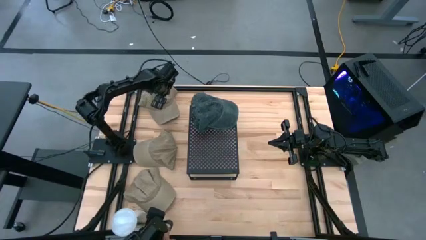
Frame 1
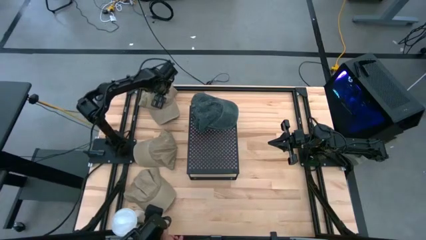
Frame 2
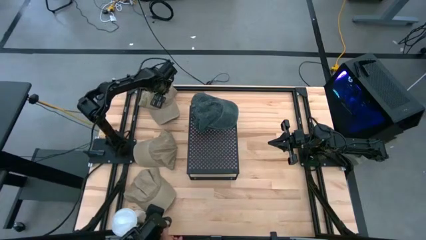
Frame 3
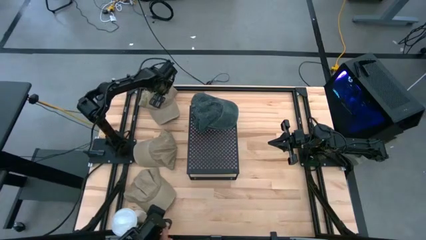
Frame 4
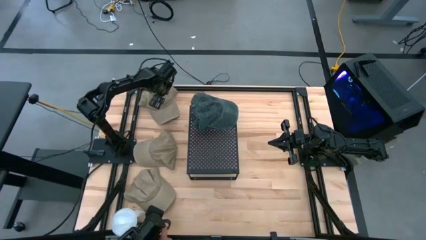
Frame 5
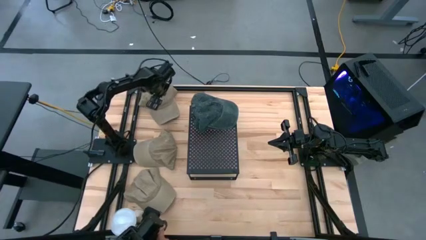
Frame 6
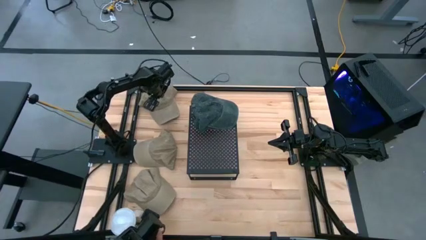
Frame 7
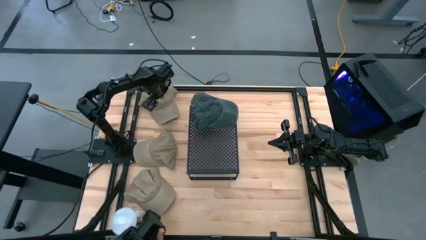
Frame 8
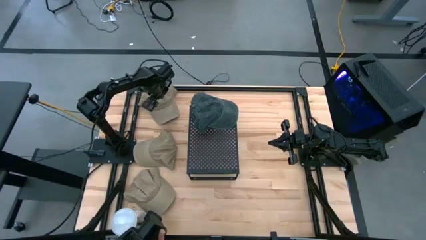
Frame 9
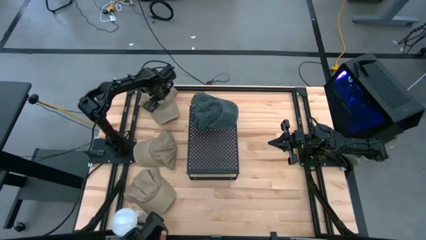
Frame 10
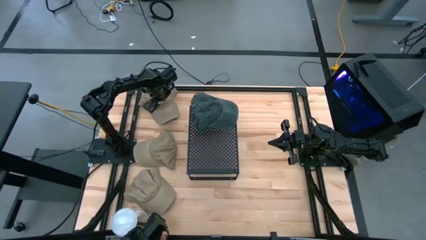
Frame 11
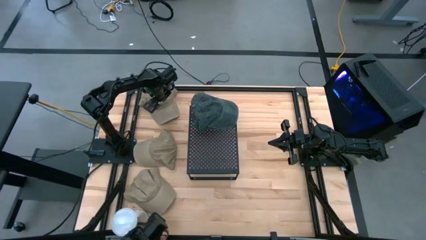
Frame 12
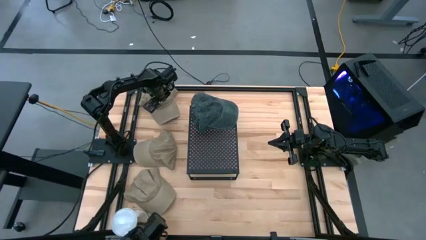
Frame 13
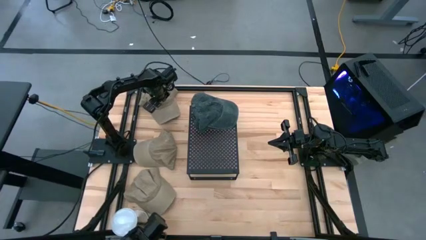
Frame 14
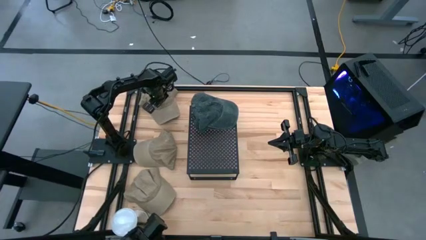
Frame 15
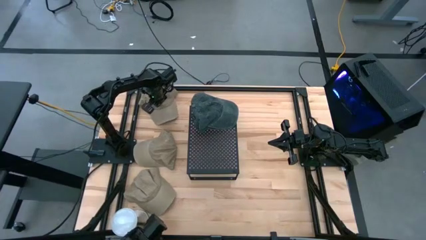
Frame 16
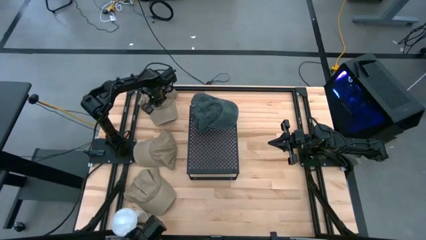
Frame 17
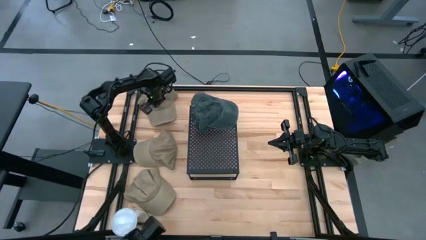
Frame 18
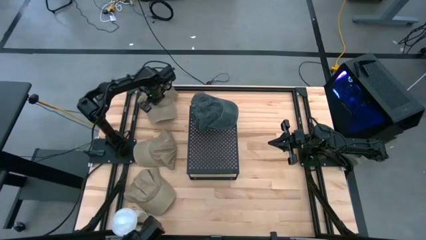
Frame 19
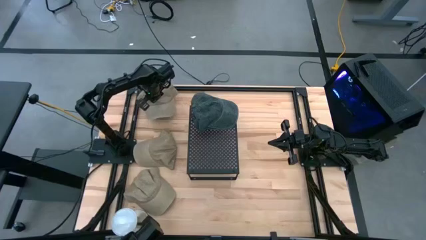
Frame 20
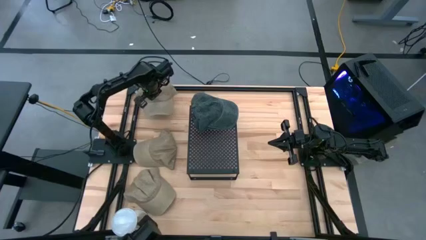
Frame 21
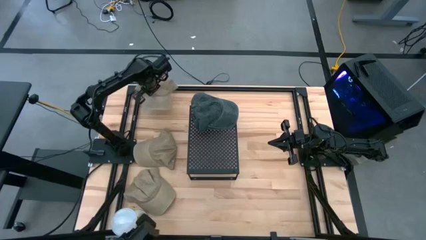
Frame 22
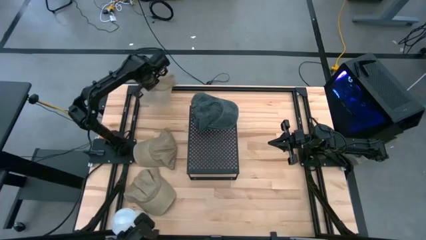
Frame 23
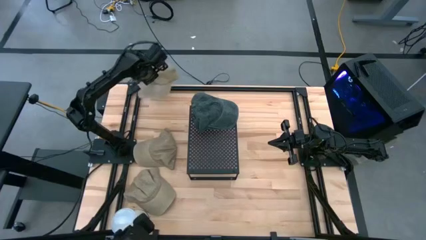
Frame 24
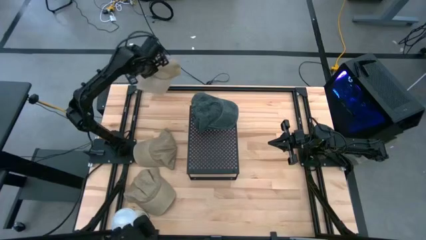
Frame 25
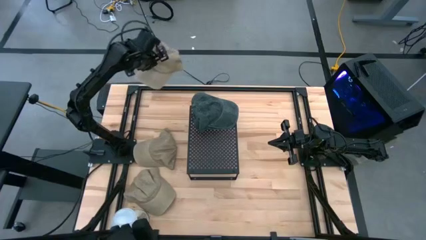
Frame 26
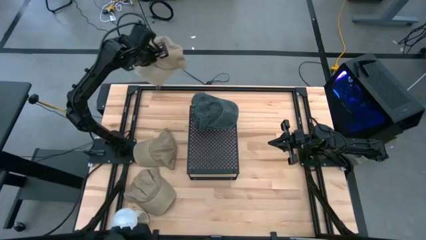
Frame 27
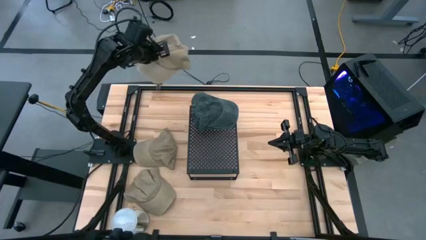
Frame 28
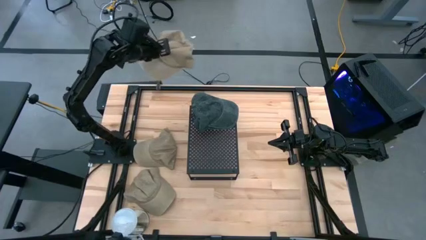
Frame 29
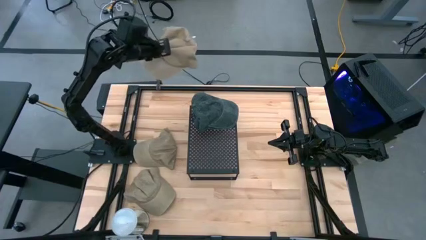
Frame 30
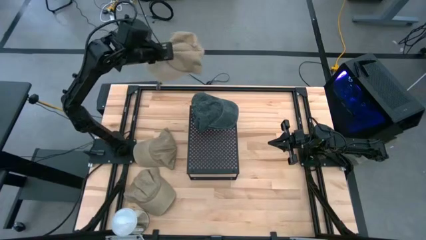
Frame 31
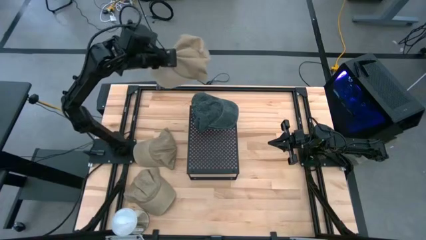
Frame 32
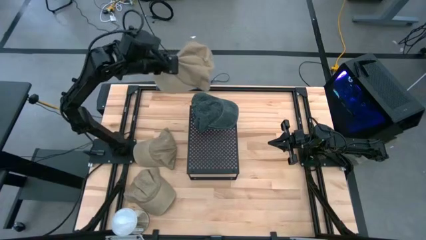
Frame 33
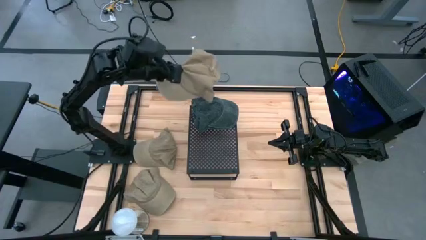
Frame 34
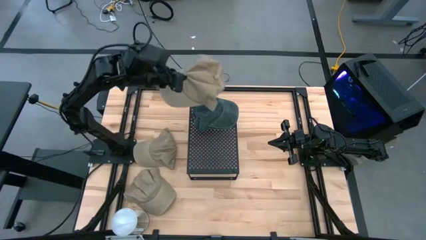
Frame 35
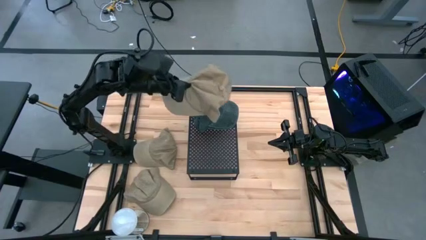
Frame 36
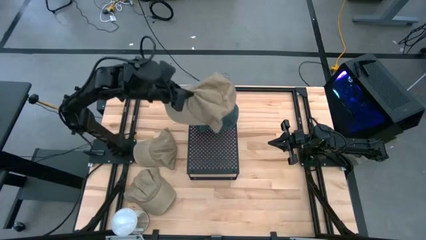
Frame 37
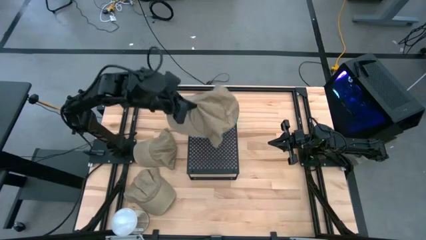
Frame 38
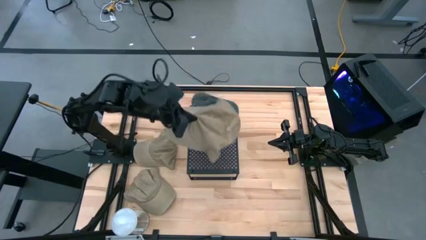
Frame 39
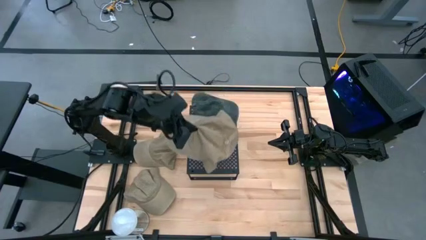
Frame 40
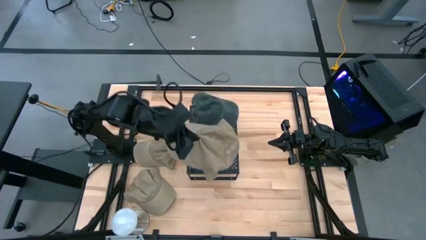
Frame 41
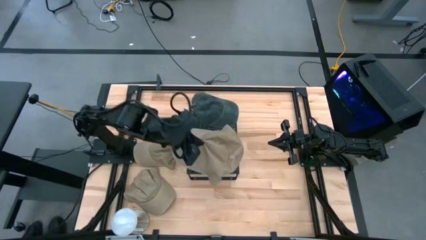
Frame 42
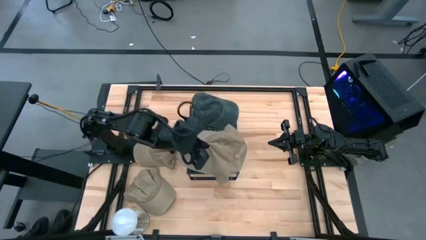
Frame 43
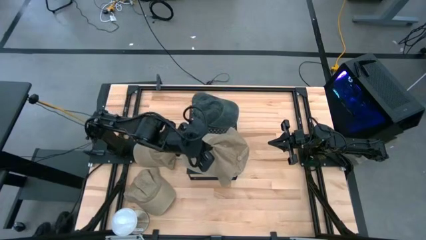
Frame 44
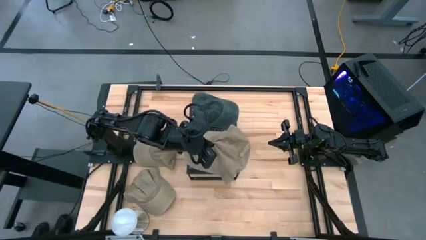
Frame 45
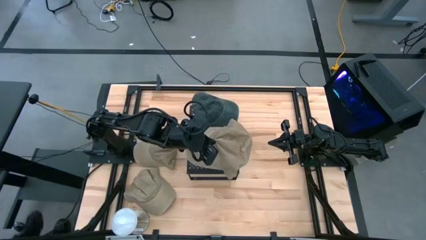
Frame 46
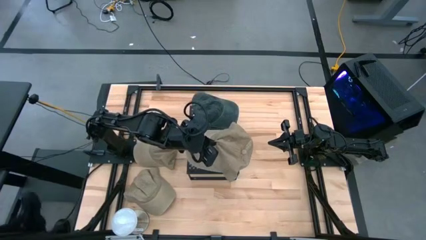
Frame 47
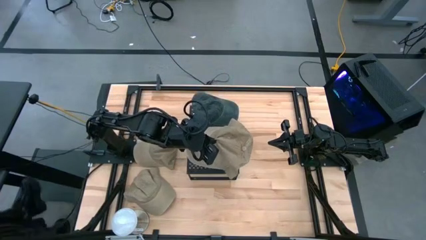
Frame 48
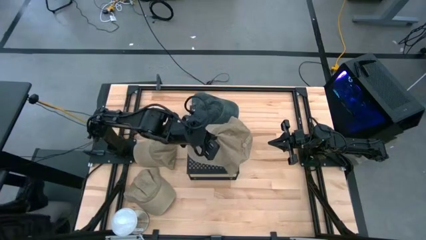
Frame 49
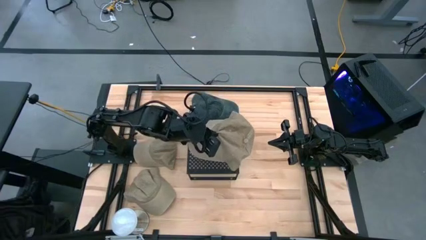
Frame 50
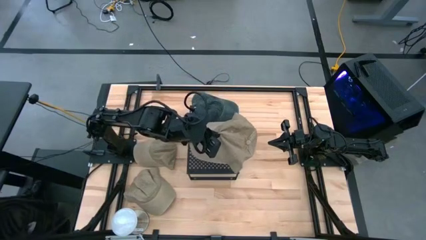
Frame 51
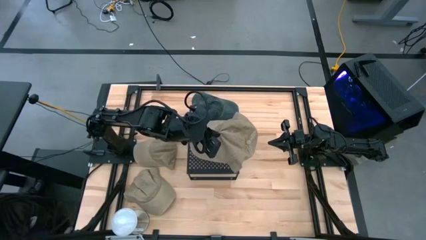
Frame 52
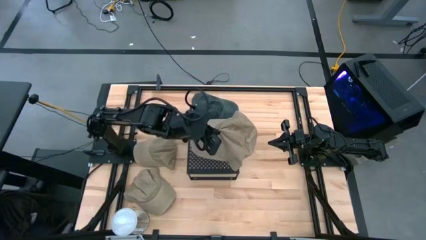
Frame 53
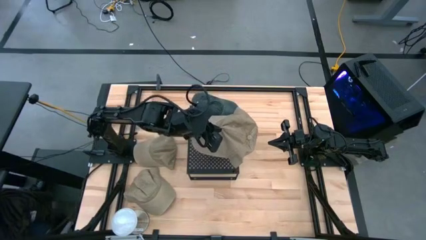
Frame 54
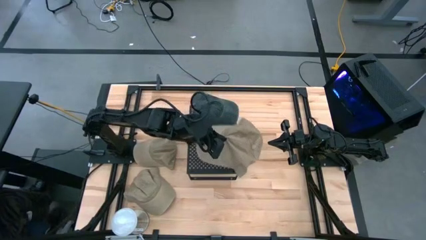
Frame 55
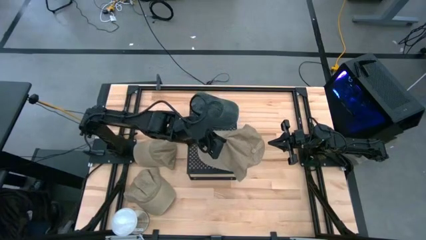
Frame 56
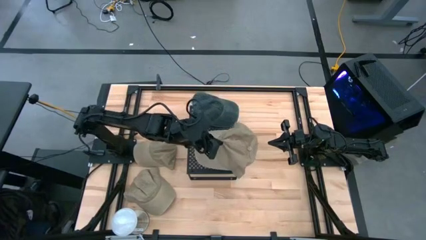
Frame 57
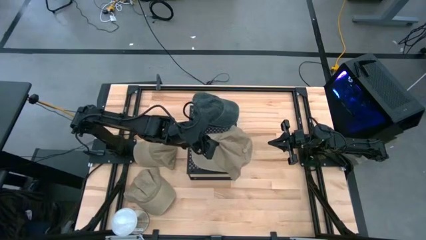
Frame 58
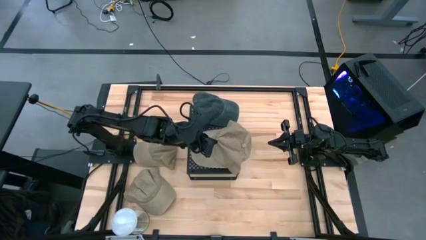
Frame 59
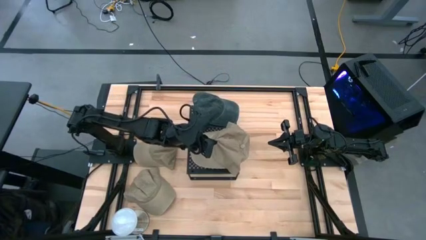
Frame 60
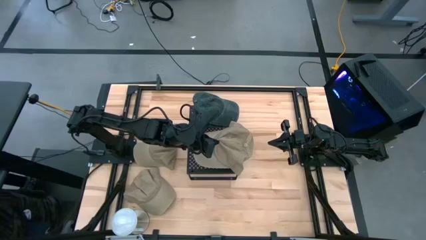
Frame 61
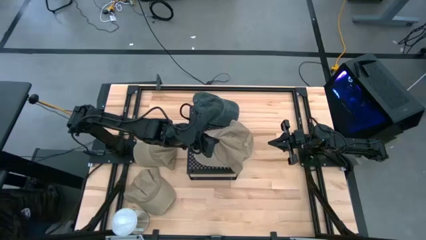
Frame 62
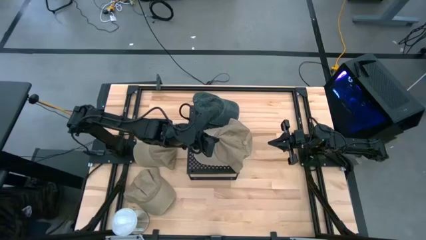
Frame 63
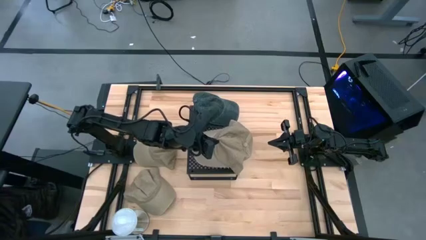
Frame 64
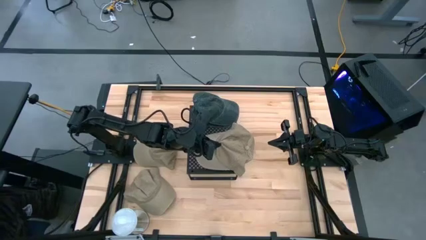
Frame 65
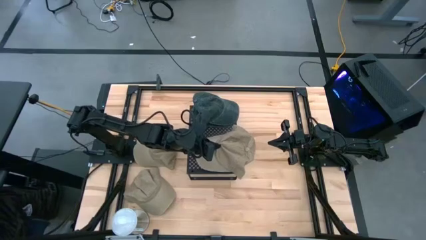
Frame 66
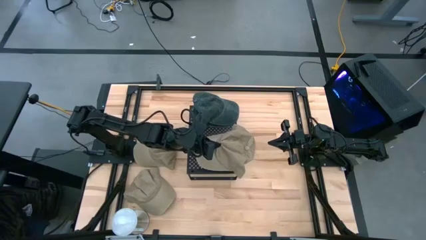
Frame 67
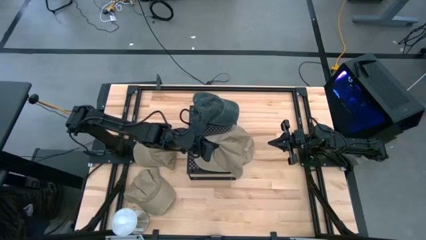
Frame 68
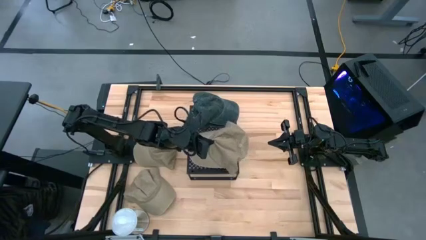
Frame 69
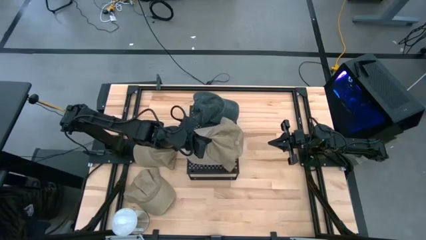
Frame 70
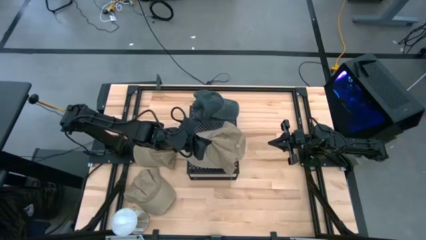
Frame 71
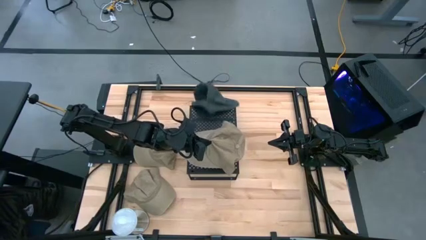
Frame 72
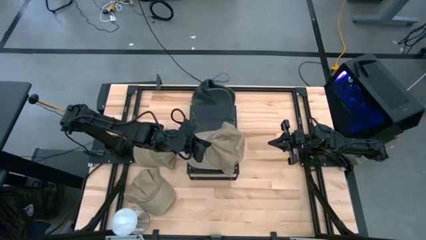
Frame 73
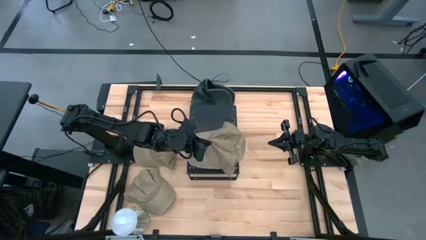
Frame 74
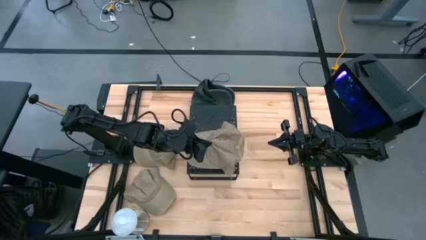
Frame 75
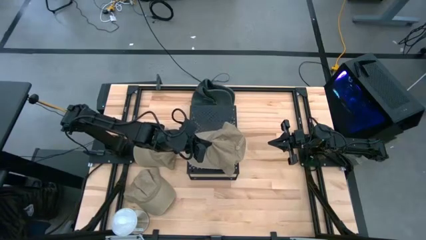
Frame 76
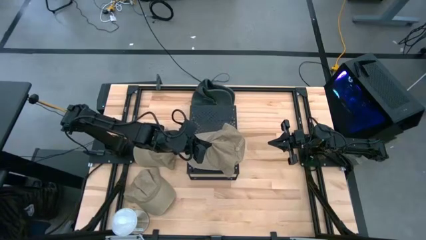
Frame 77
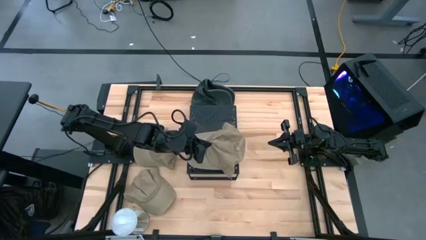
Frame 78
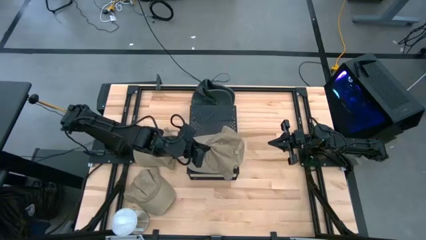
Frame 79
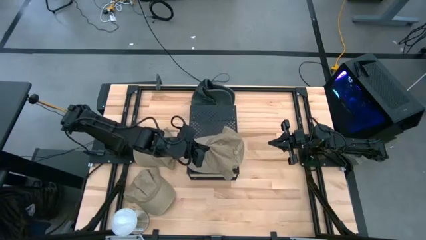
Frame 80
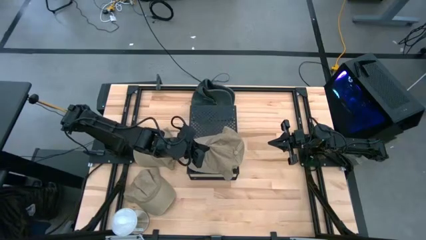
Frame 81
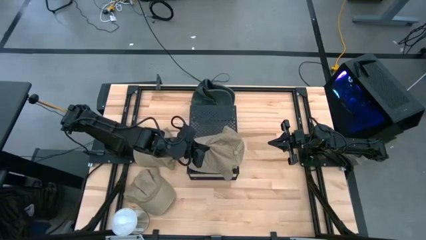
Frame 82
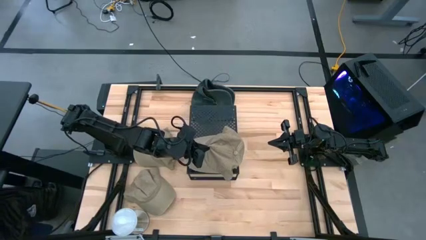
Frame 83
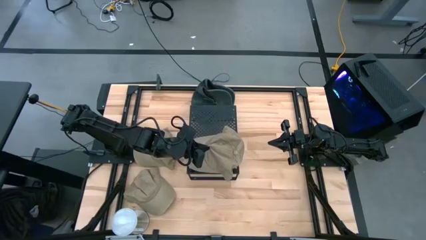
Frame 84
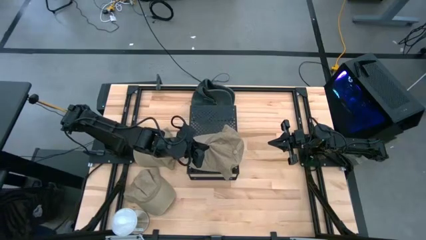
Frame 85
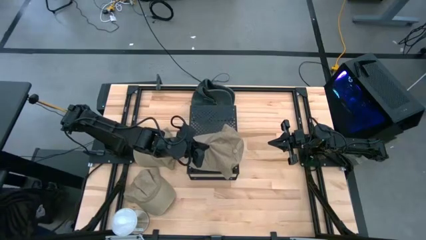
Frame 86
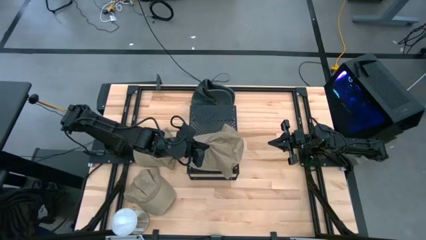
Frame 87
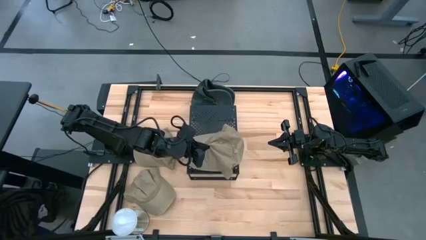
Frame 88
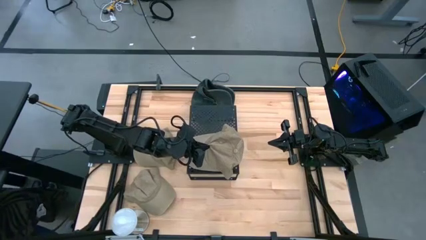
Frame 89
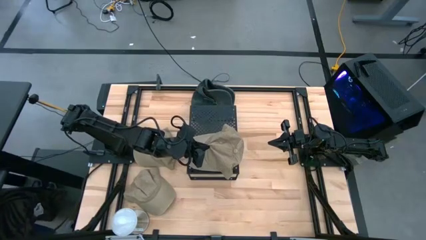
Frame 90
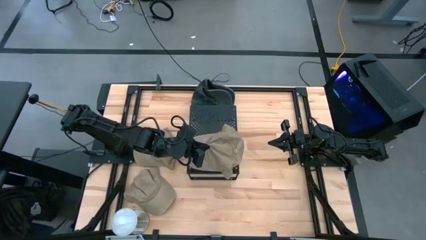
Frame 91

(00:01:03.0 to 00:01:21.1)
Task: Pick & Place hat
Put the top brown cap on the shelf
